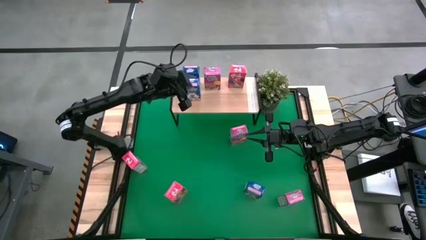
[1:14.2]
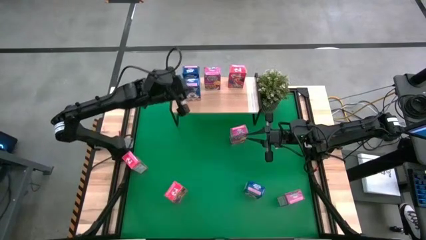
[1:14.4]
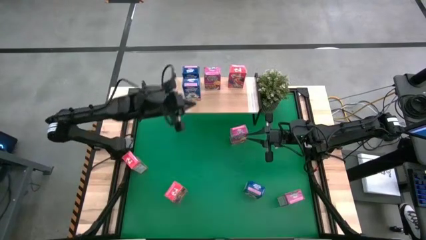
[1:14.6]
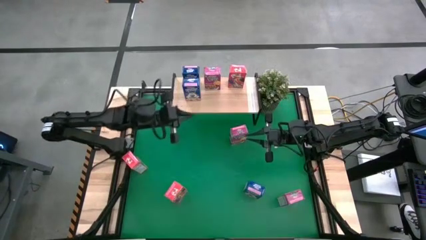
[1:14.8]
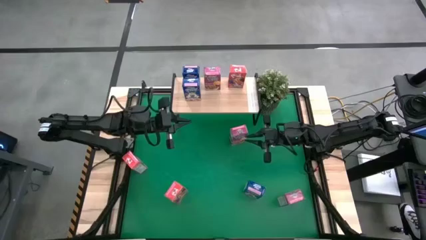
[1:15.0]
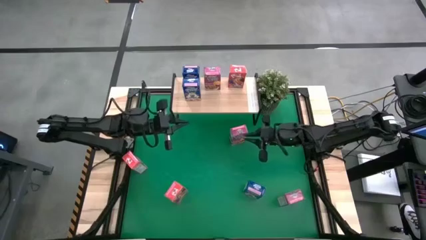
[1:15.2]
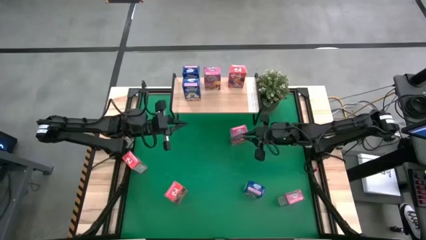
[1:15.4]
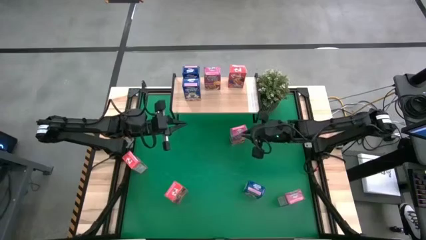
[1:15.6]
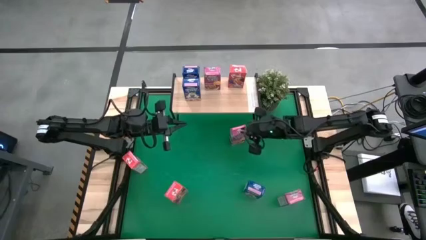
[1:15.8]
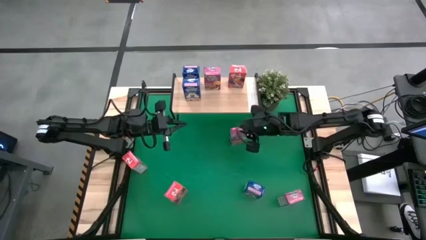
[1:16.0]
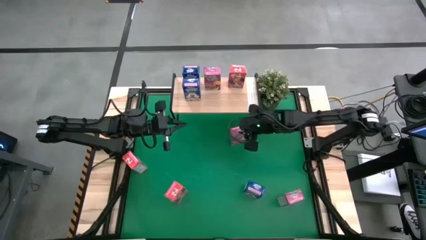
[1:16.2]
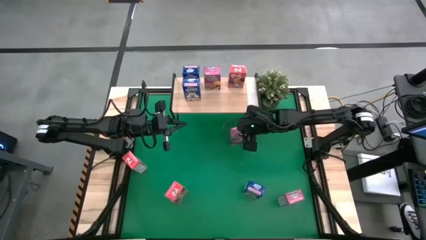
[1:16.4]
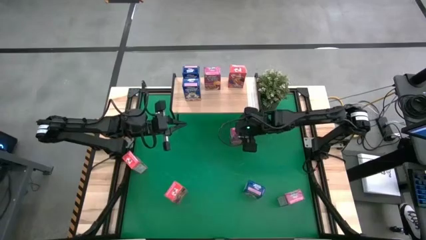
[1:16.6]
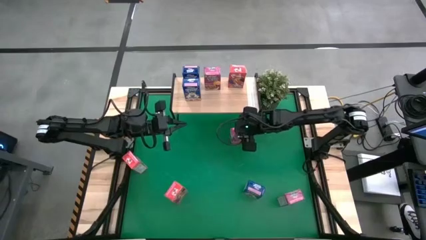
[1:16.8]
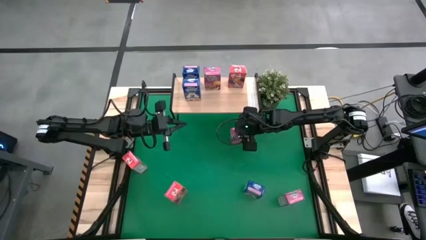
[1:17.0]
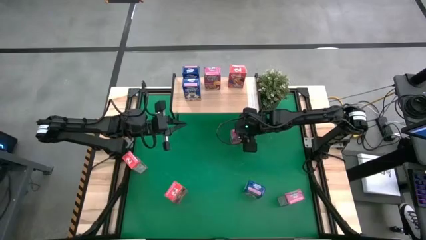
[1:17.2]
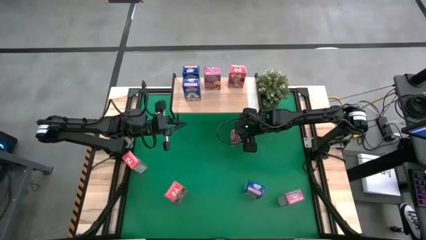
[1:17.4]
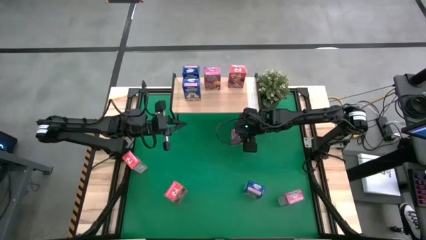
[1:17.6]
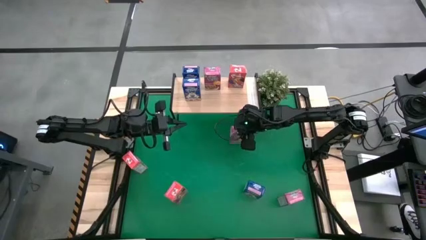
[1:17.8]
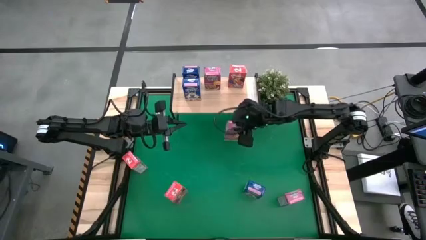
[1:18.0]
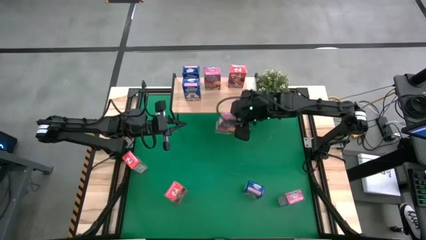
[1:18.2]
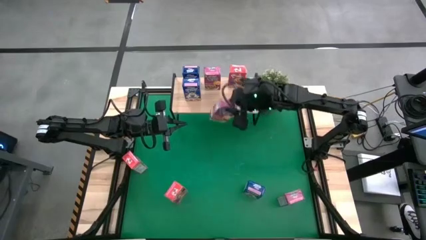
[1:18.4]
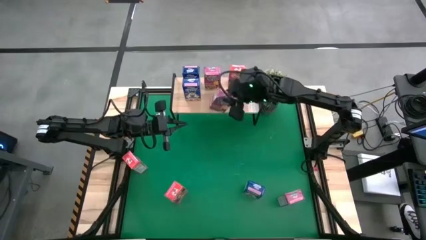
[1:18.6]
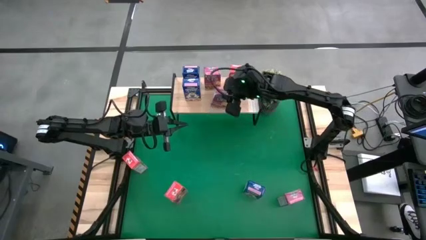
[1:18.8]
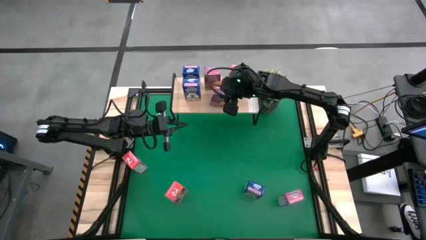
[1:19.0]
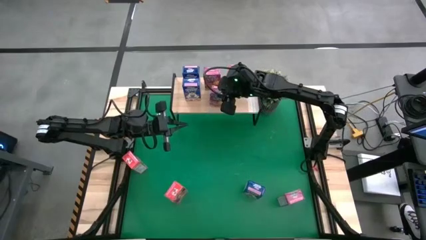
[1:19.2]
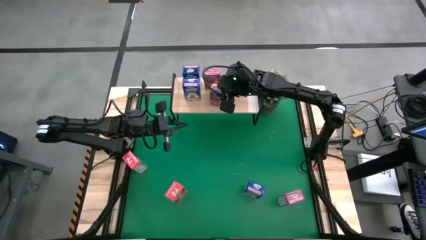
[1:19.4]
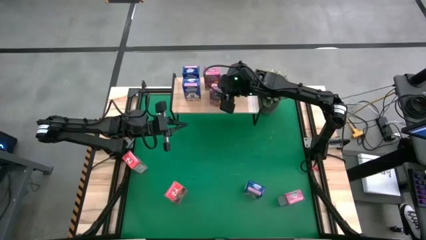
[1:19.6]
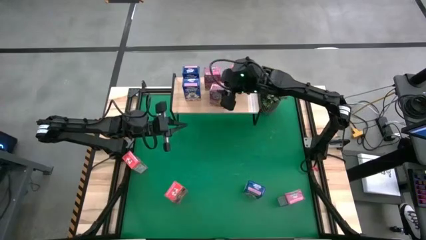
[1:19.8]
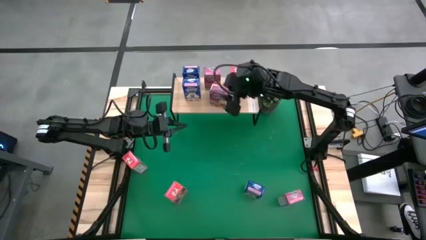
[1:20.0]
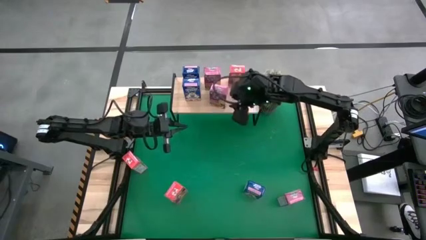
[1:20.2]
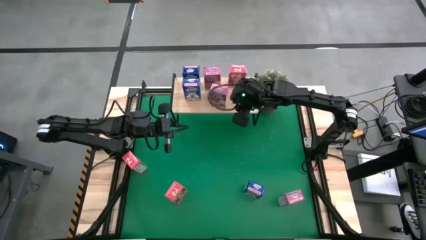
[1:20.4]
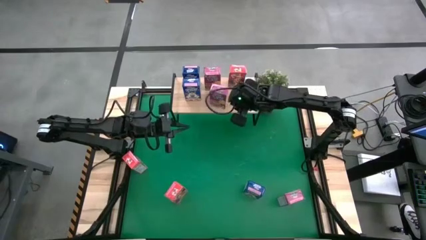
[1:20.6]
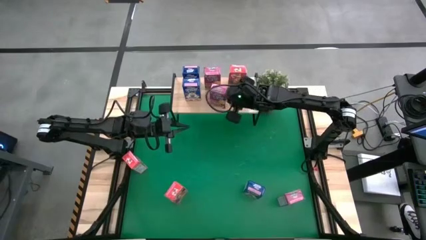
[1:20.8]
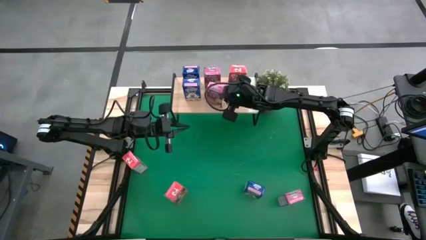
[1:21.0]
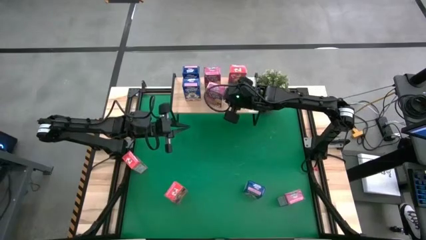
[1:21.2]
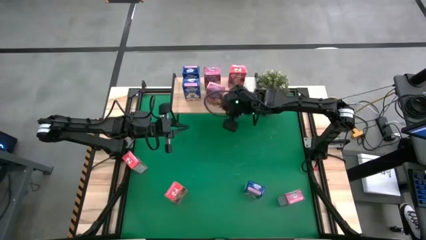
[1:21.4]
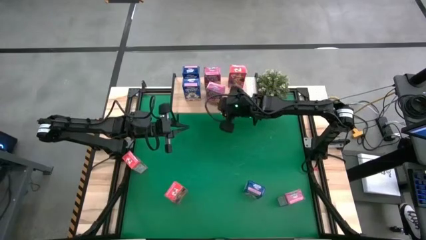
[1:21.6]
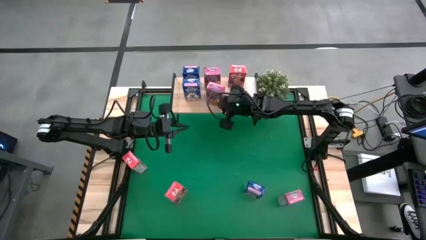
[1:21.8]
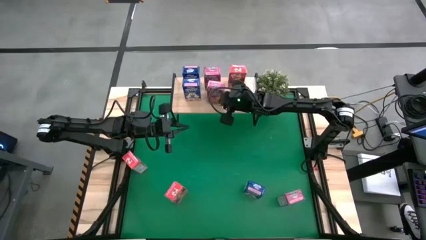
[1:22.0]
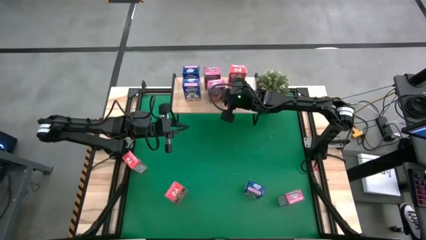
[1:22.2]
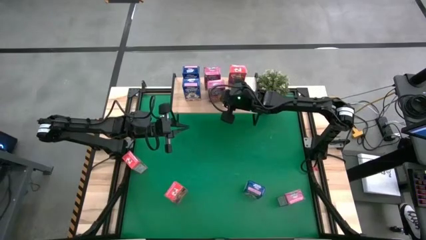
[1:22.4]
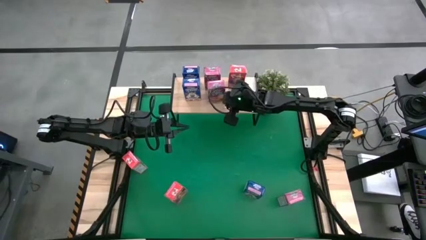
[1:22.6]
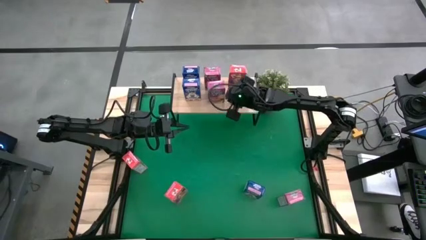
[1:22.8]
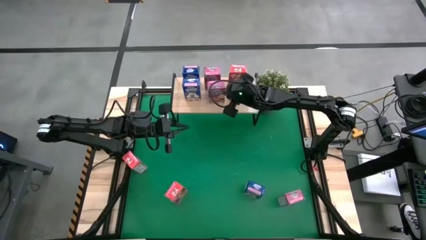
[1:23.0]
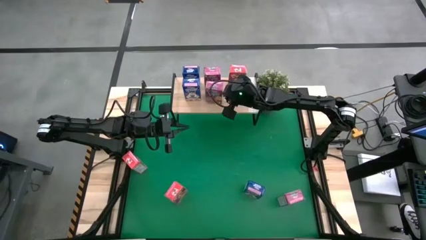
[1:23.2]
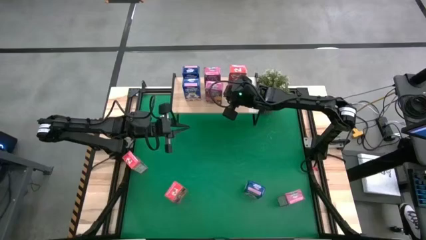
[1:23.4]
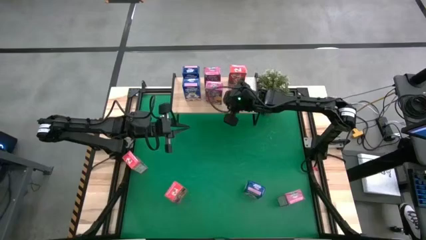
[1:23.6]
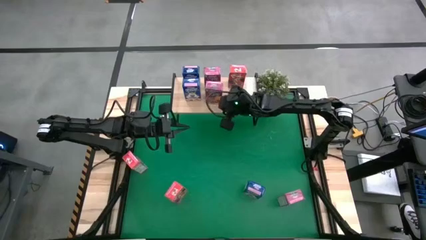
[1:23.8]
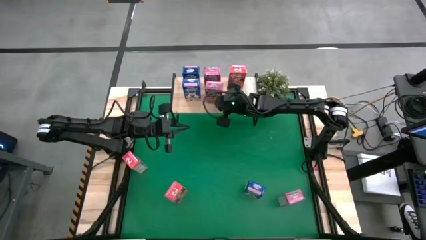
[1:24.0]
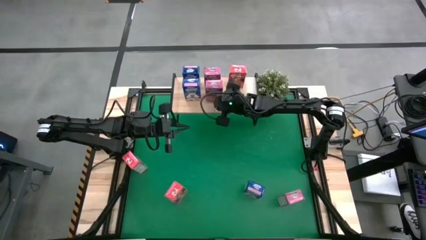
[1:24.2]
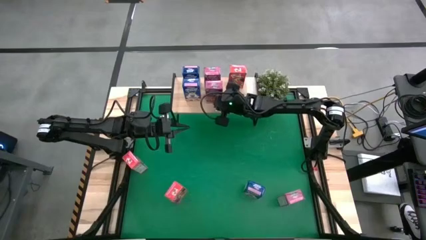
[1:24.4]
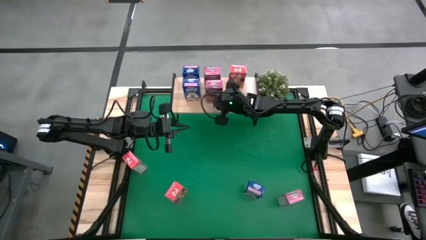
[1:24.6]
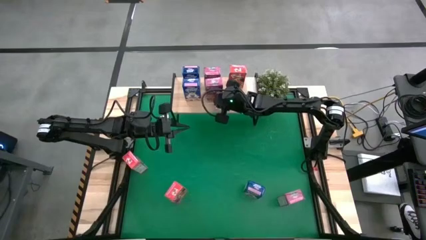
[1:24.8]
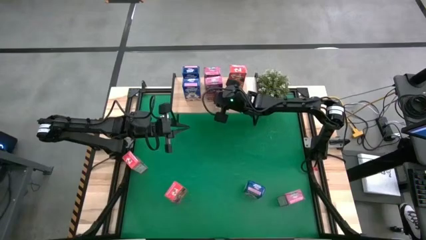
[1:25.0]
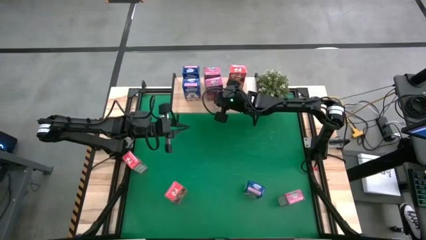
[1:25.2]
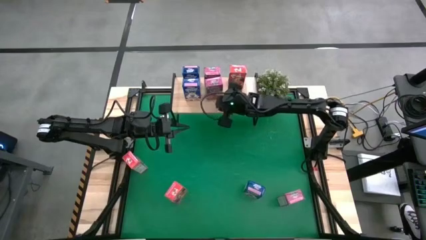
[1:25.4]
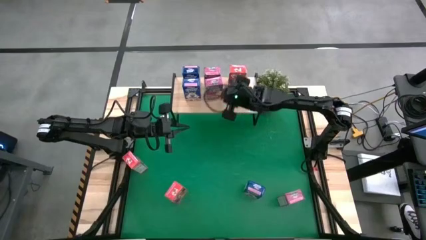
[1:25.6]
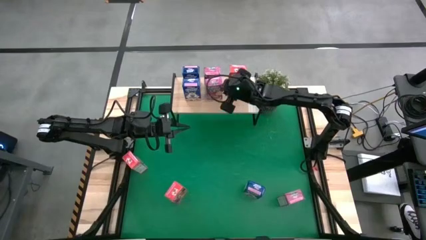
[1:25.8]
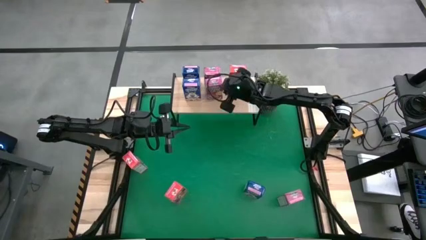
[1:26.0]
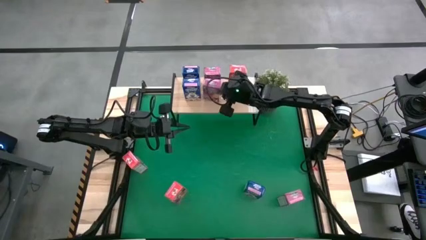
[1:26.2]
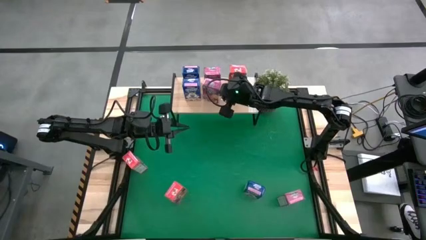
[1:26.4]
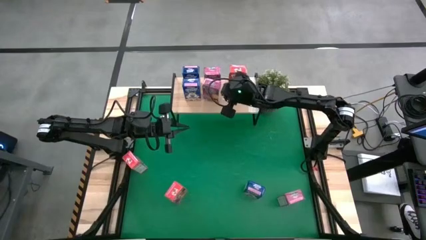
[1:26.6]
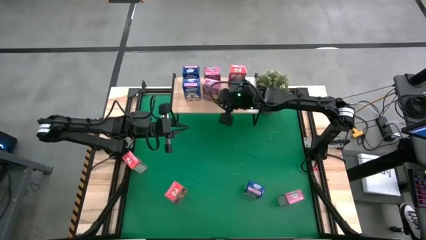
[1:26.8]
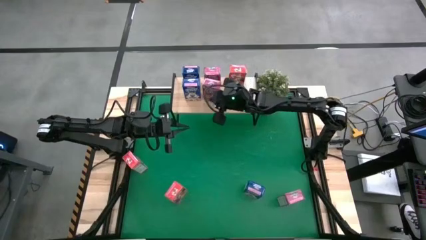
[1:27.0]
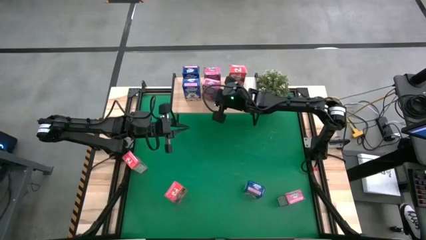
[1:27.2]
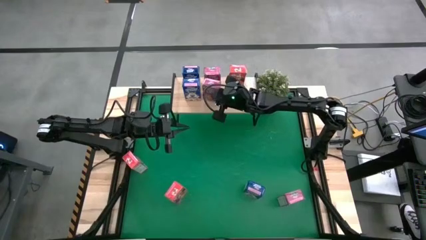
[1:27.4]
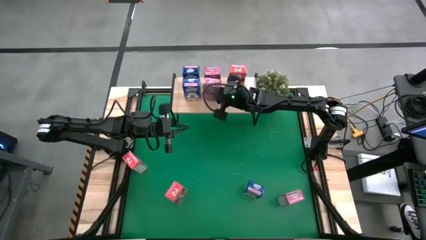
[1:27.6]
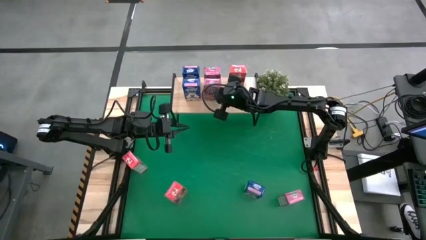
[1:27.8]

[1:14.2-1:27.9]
Task: Stack cereal on shelf
Put the top violet cereal box on the shelf aligned with the violet cereal box

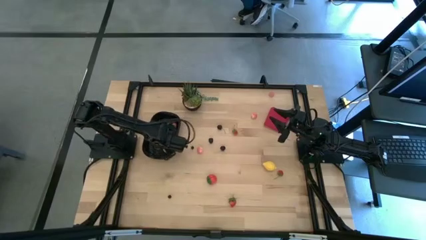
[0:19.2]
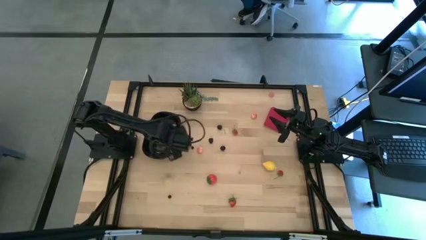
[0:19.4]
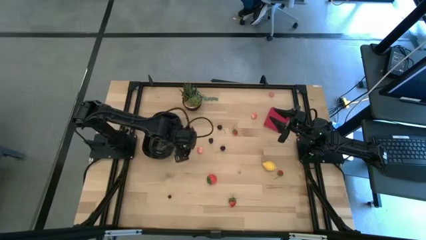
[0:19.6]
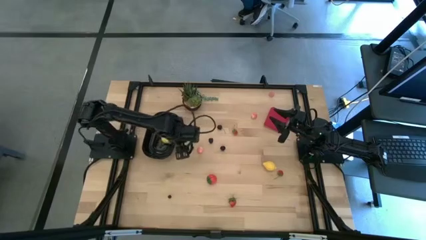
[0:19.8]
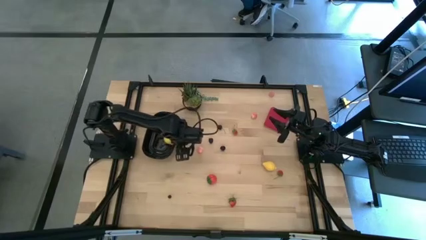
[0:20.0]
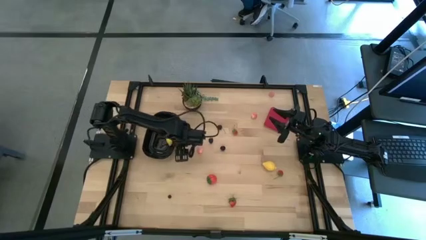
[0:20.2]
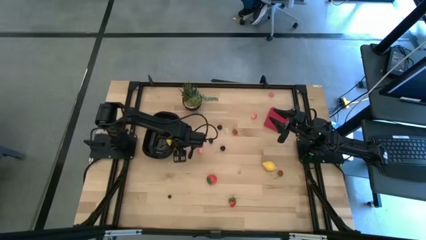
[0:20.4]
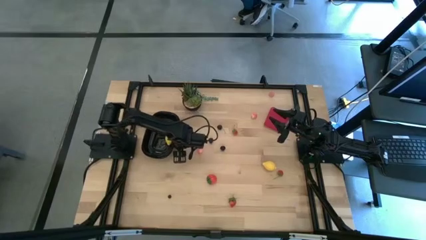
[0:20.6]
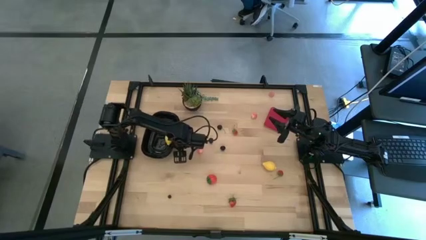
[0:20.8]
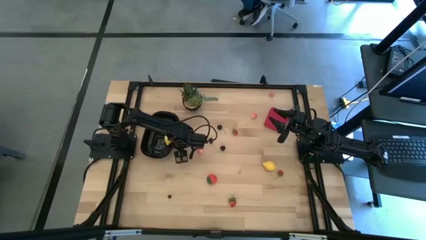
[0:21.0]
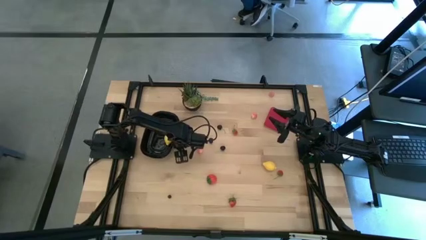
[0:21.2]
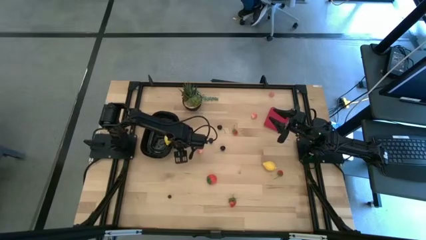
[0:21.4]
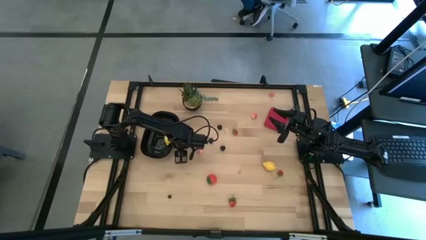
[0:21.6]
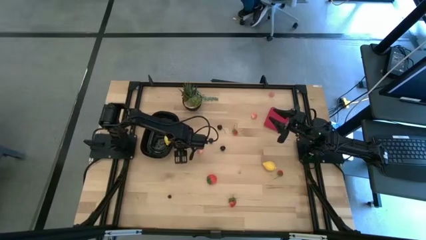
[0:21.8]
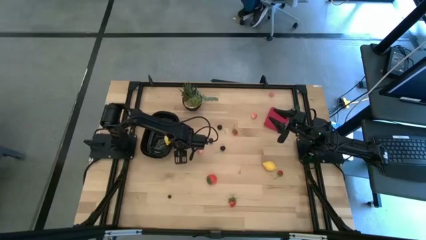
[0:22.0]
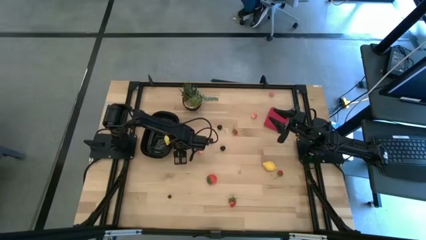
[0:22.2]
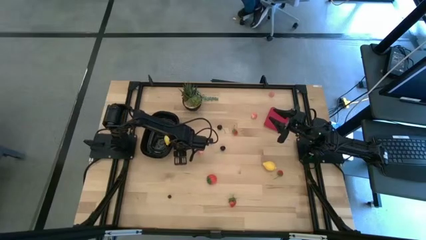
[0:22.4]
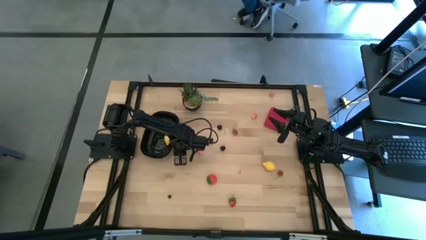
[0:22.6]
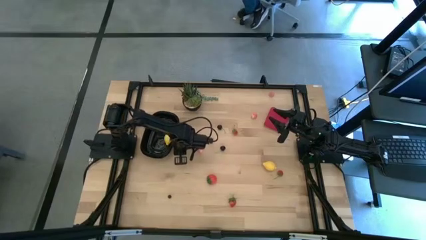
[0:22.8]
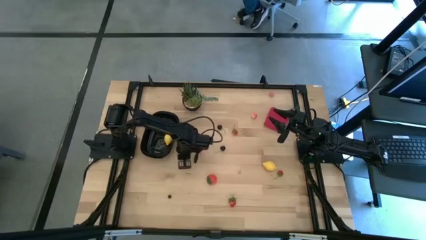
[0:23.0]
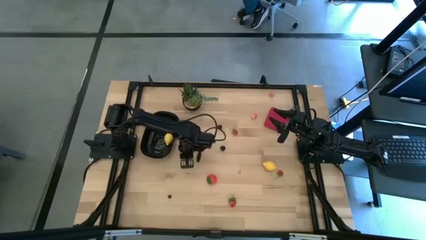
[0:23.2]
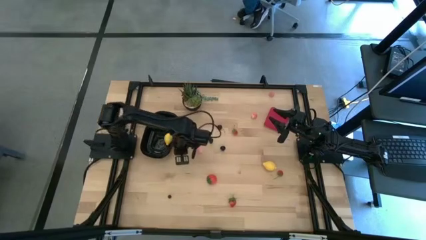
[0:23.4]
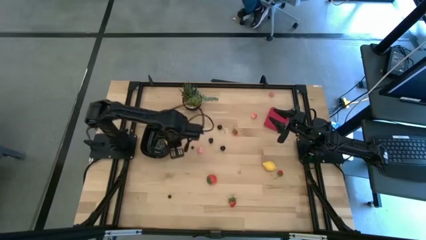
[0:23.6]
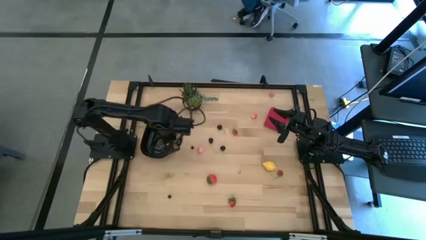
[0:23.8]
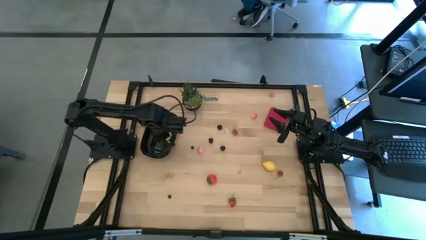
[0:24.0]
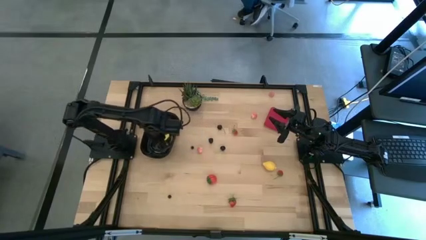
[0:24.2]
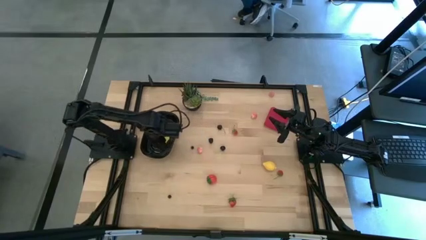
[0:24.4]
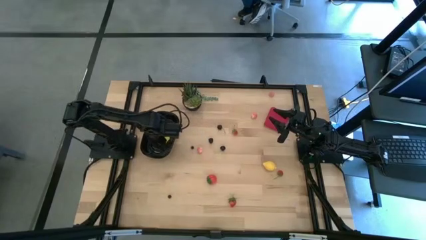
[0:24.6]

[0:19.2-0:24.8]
Task: Pick and placing Produce into tupperware
Put the blackberry into the black container
